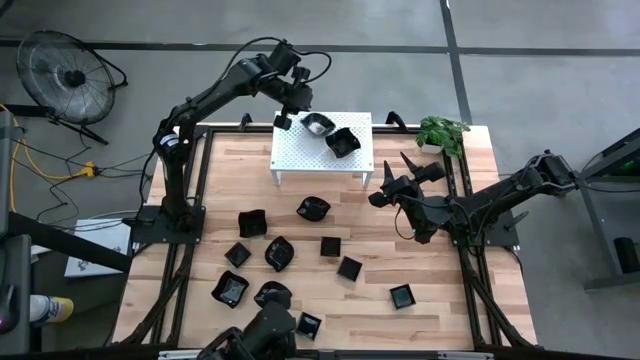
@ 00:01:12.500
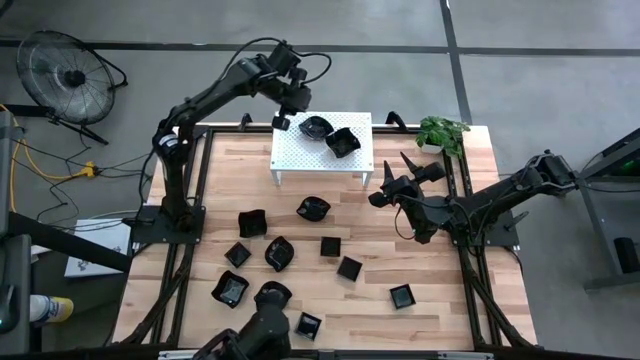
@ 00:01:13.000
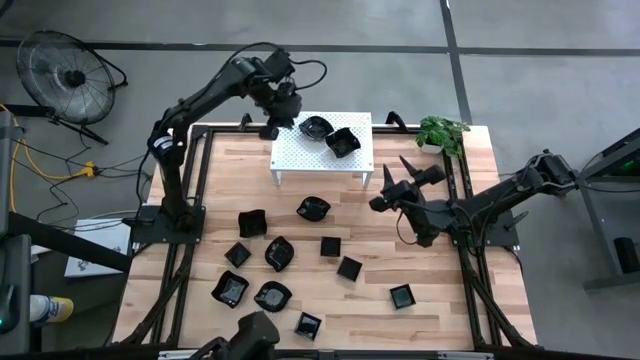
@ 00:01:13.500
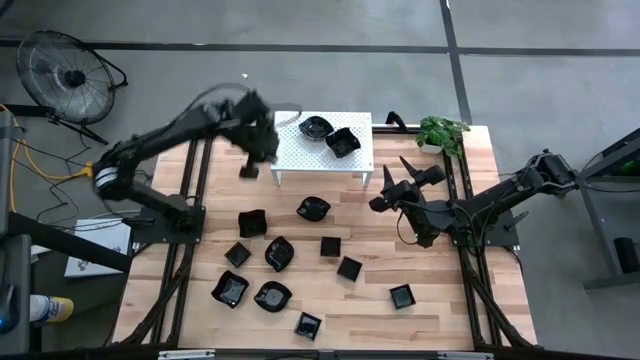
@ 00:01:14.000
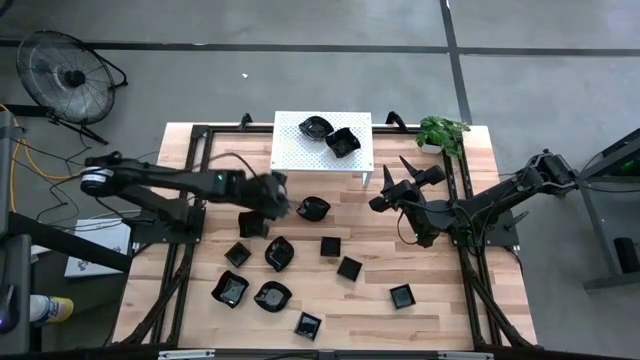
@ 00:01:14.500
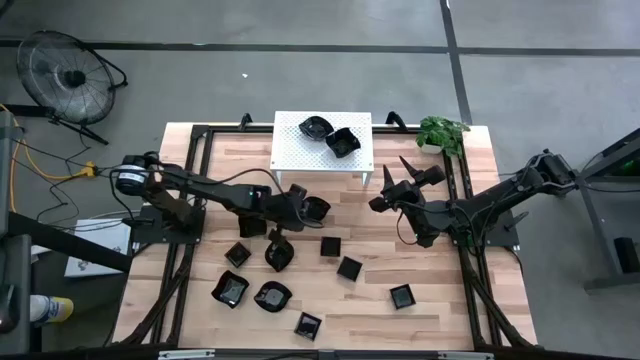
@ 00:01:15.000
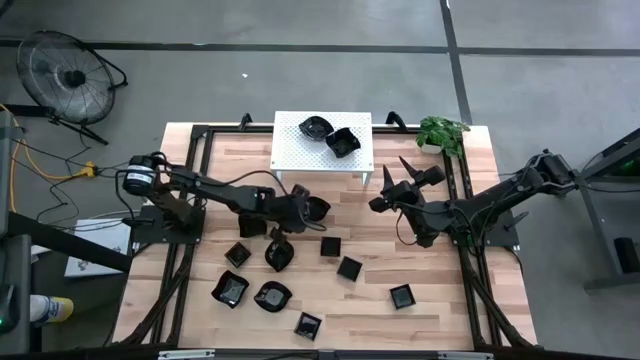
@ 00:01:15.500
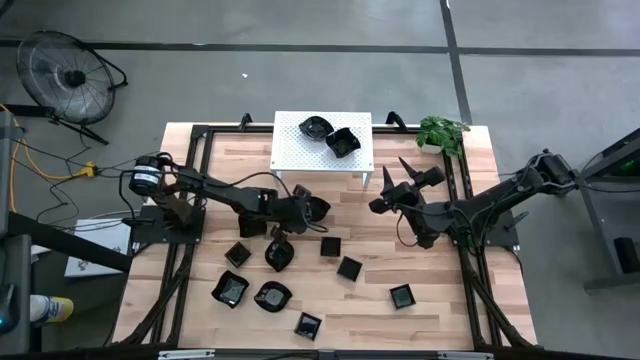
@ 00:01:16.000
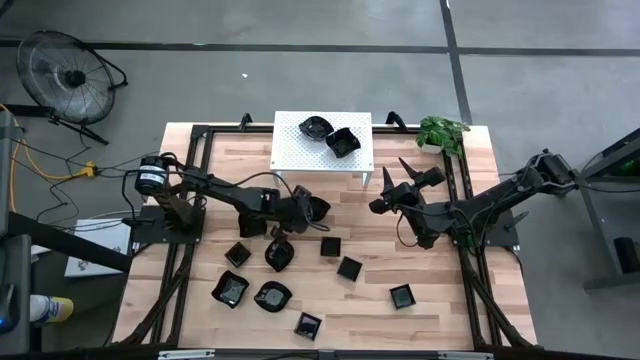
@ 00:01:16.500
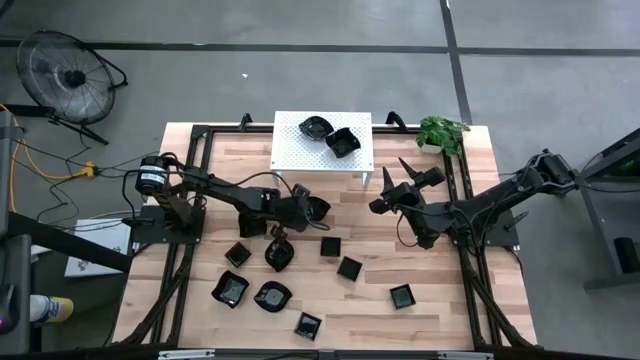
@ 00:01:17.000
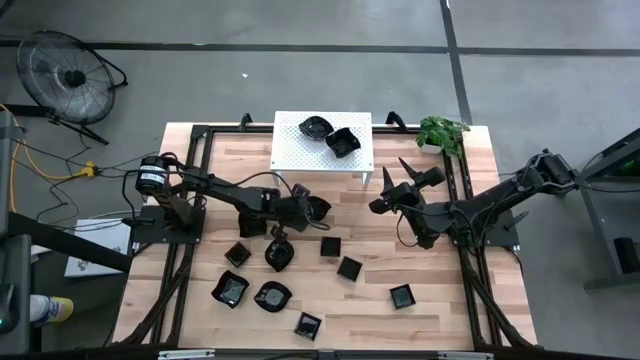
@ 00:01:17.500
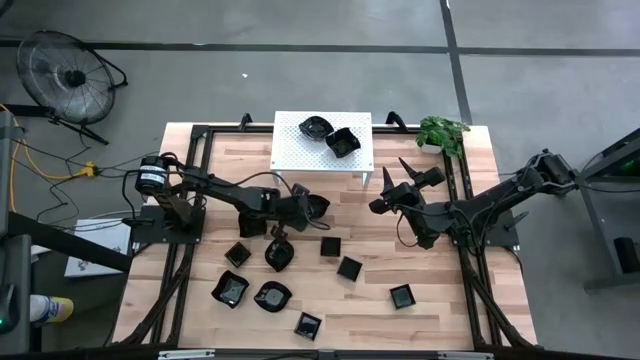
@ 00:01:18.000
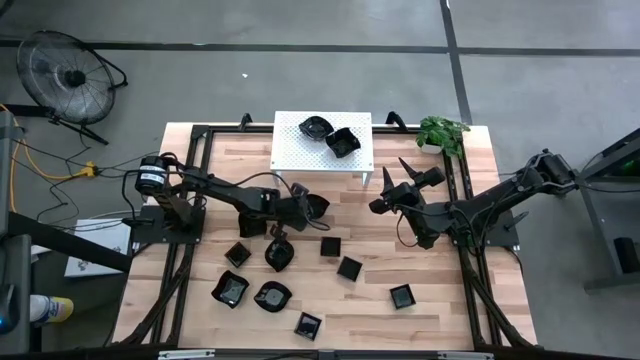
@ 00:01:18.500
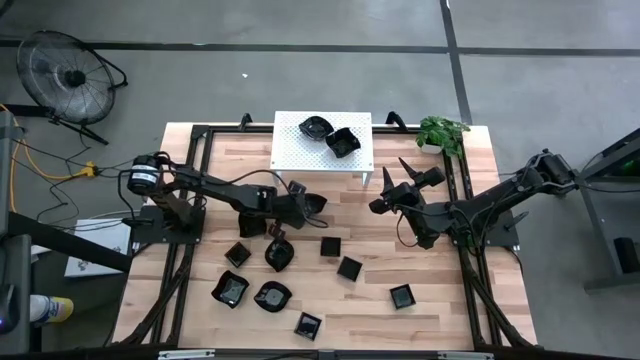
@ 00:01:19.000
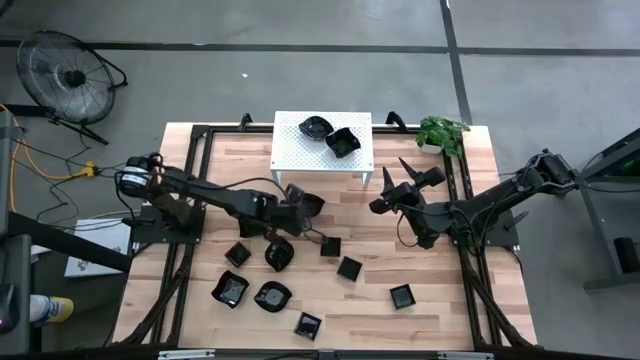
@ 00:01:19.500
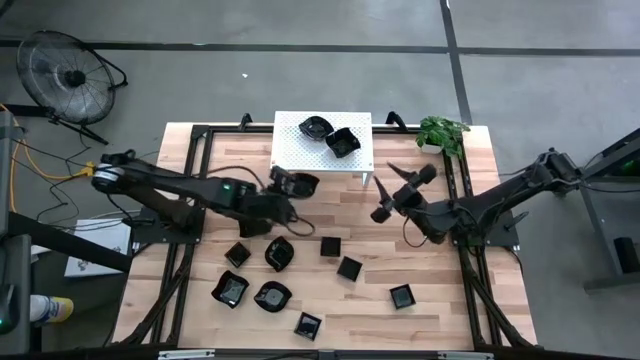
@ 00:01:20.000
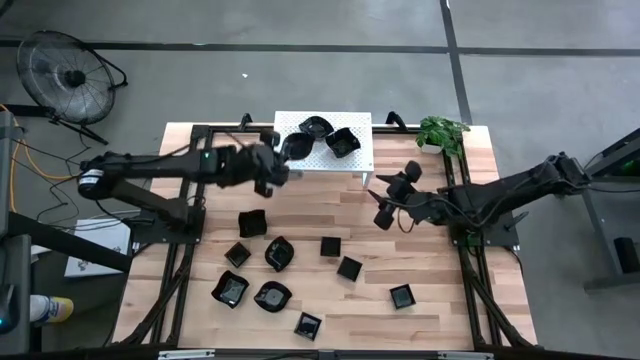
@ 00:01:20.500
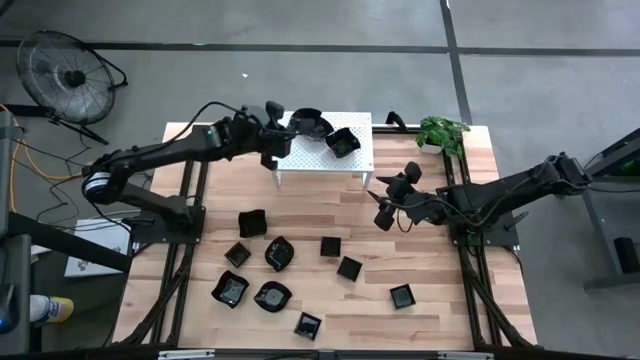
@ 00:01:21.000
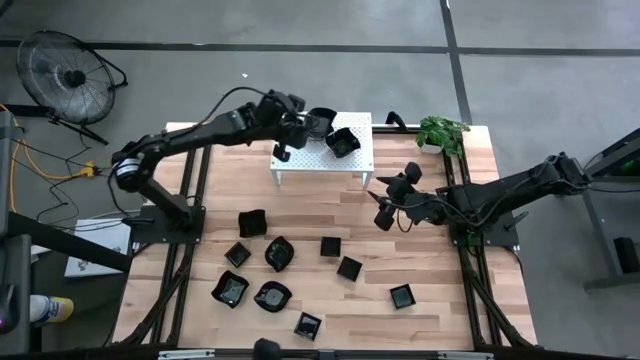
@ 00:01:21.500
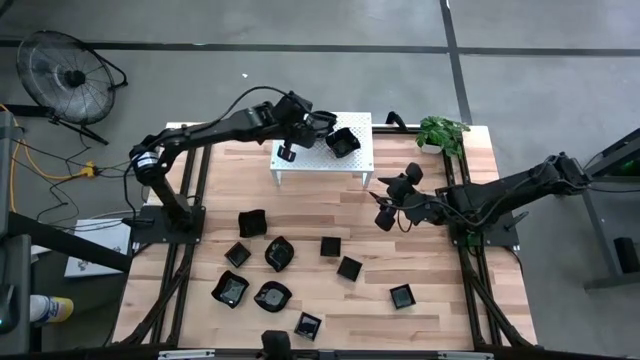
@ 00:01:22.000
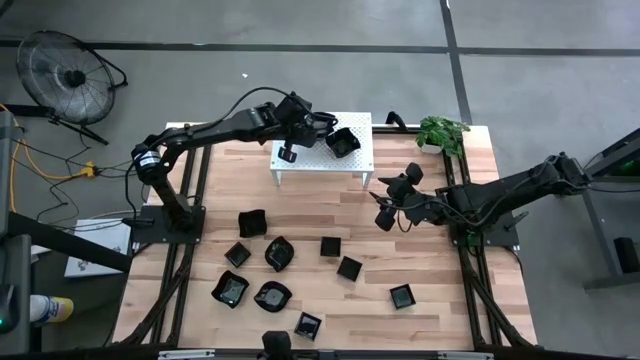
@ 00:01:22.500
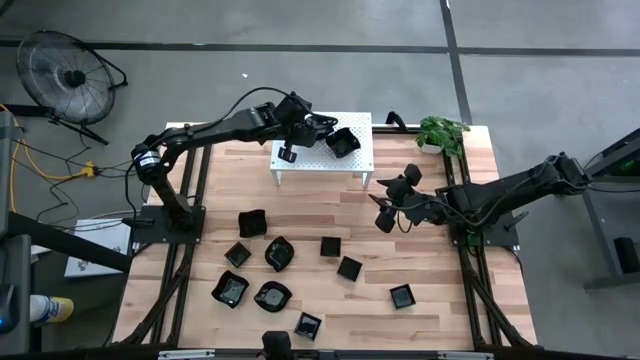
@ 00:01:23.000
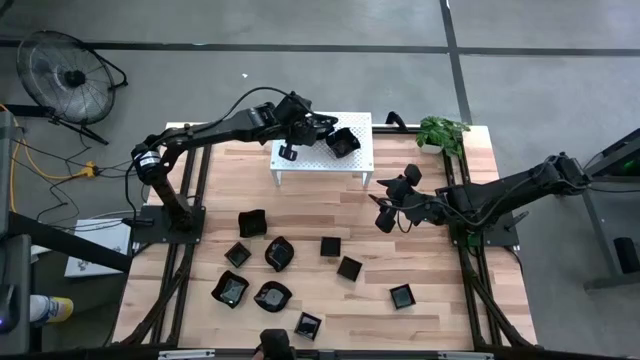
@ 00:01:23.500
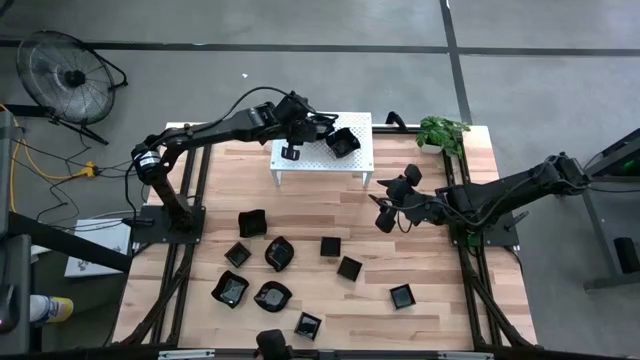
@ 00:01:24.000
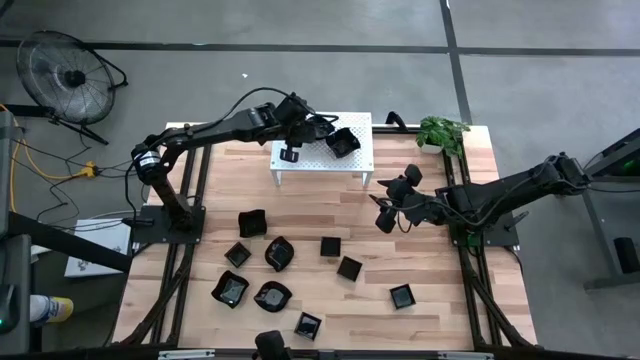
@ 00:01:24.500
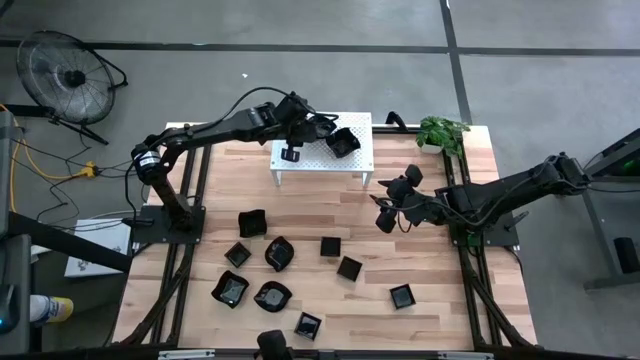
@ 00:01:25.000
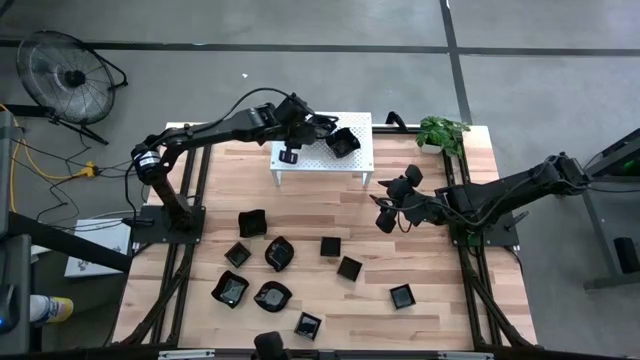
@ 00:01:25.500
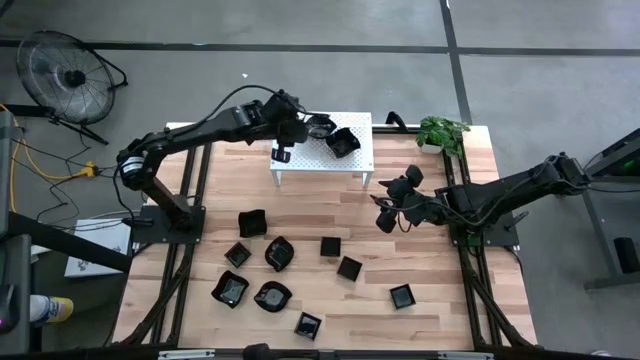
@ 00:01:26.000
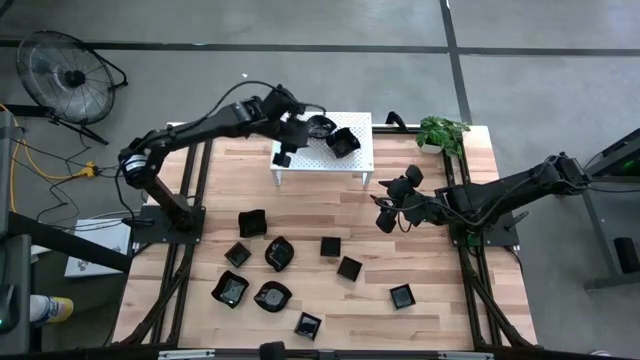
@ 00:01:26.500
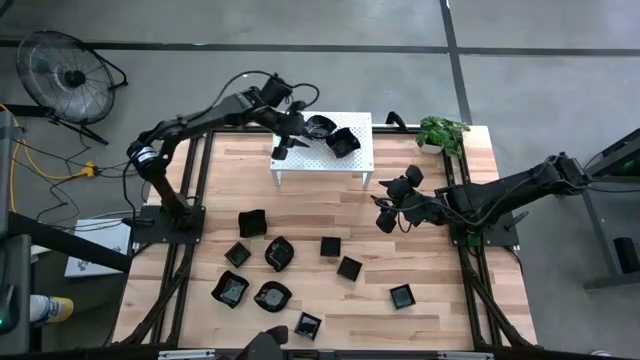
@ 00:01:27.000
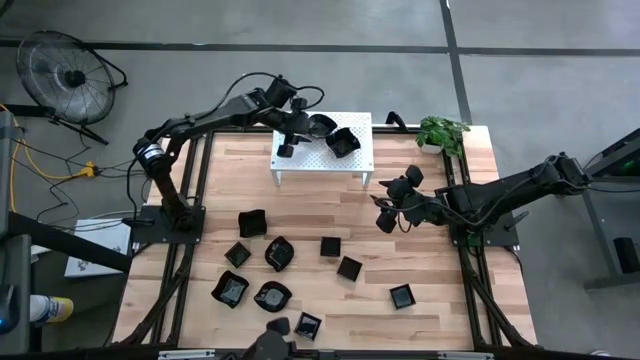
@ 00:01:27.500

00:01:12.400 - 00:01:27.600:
Task: Pick & Place Mini shaped plates
Stack the black leaf-shaped plate on top of the black leaf-shaped plate on the shelf
